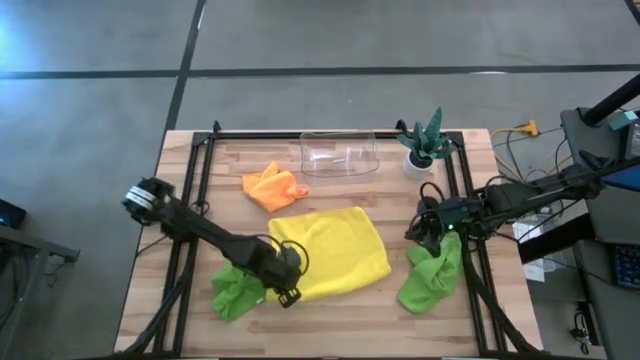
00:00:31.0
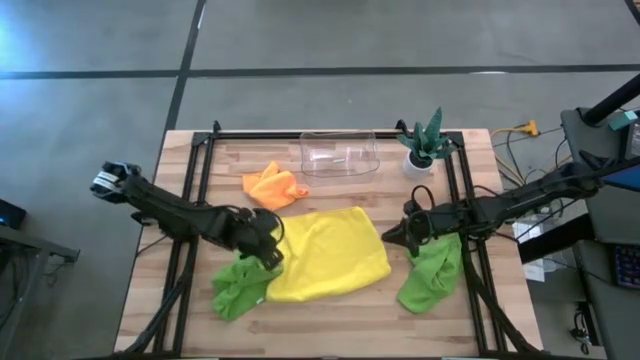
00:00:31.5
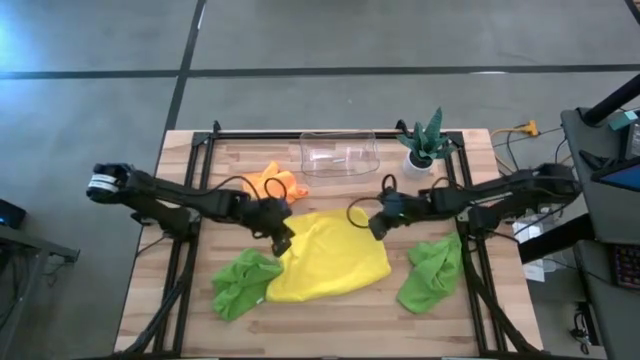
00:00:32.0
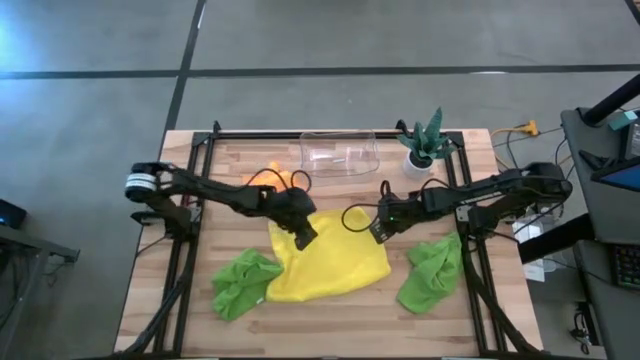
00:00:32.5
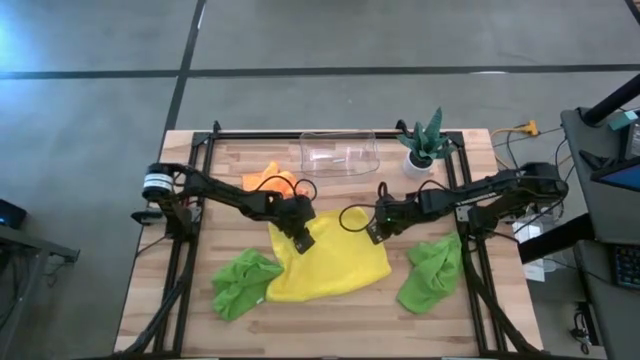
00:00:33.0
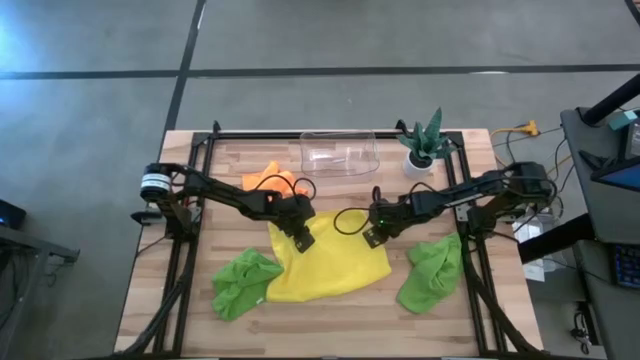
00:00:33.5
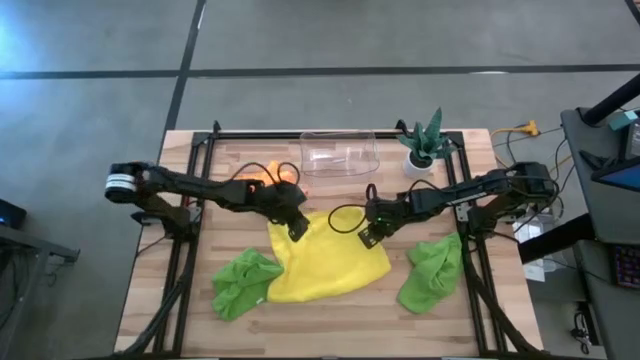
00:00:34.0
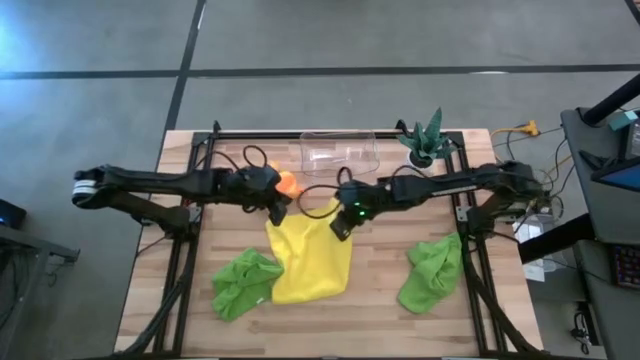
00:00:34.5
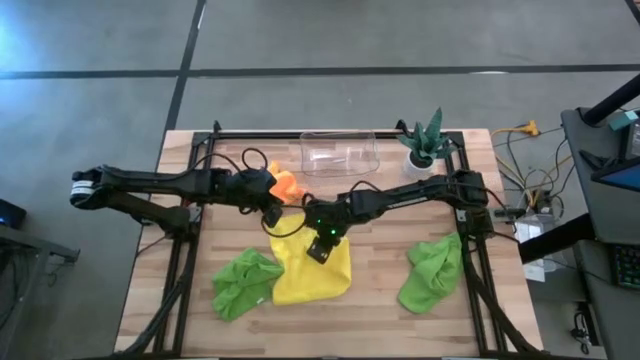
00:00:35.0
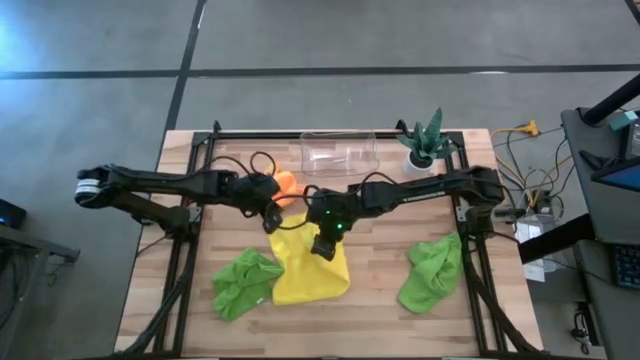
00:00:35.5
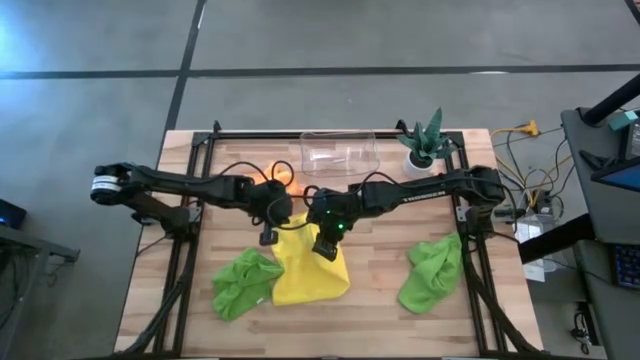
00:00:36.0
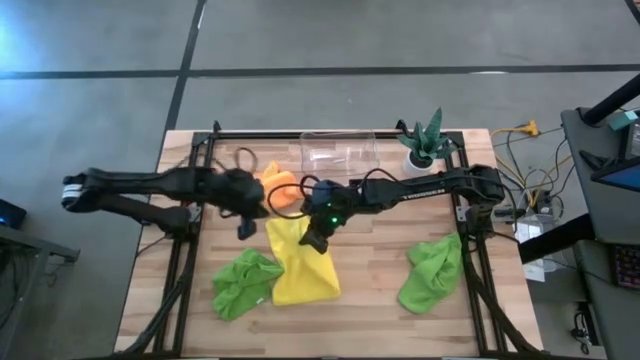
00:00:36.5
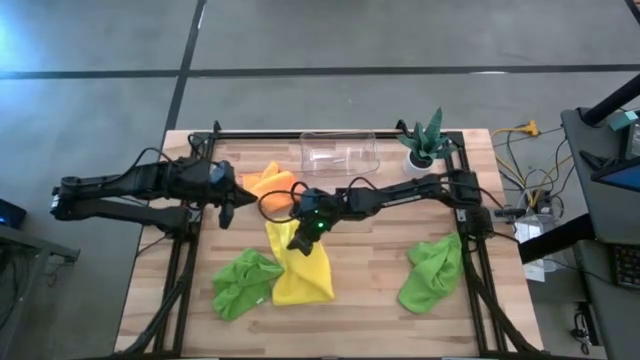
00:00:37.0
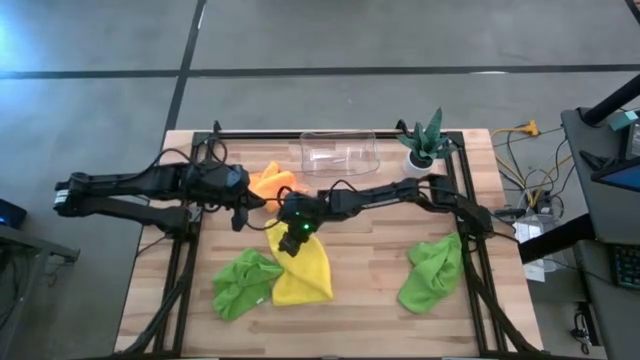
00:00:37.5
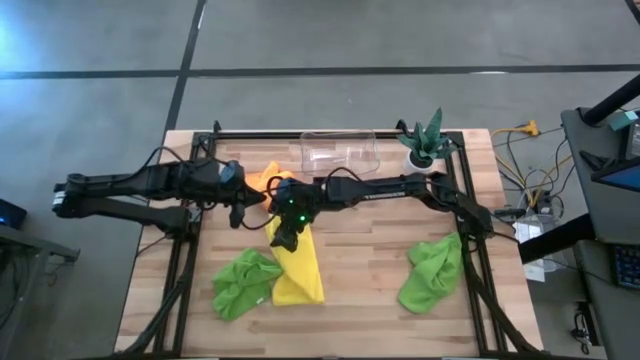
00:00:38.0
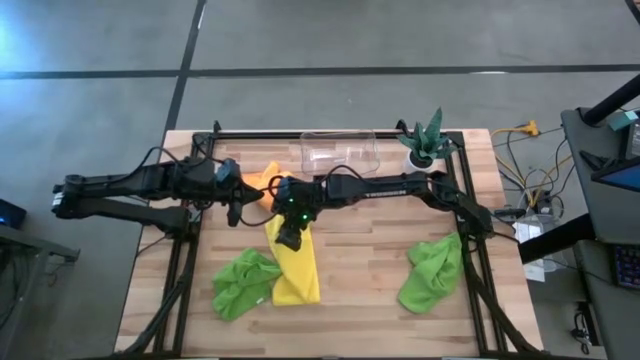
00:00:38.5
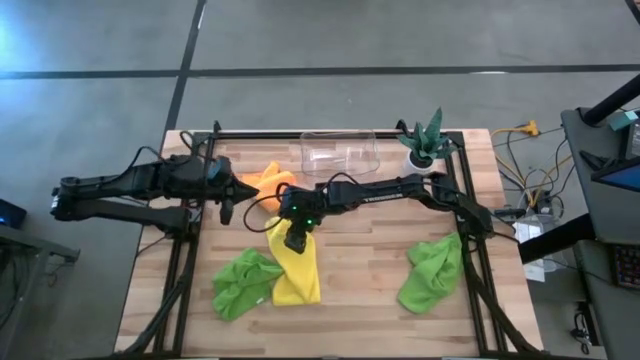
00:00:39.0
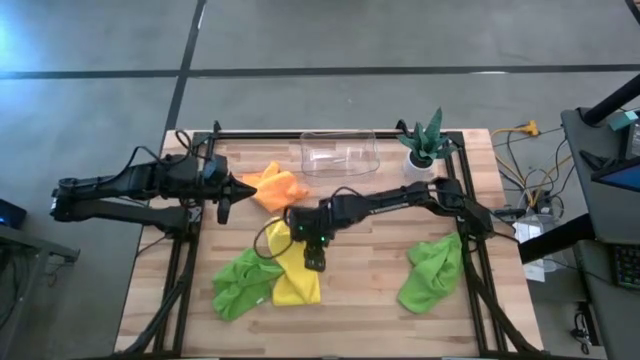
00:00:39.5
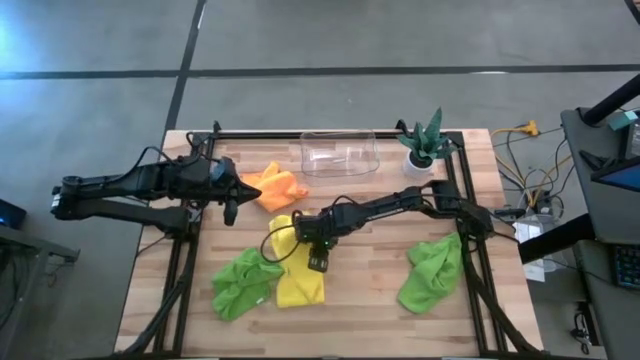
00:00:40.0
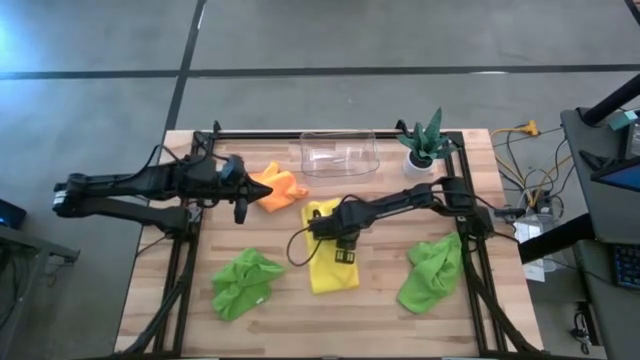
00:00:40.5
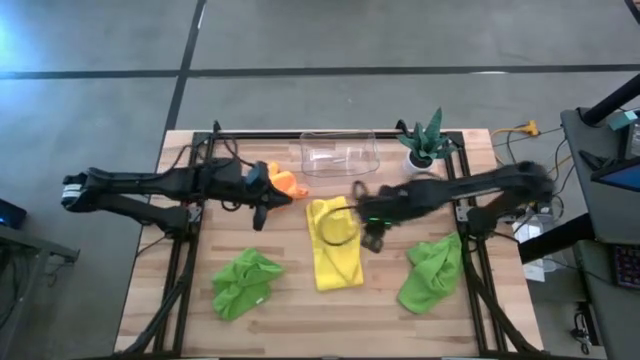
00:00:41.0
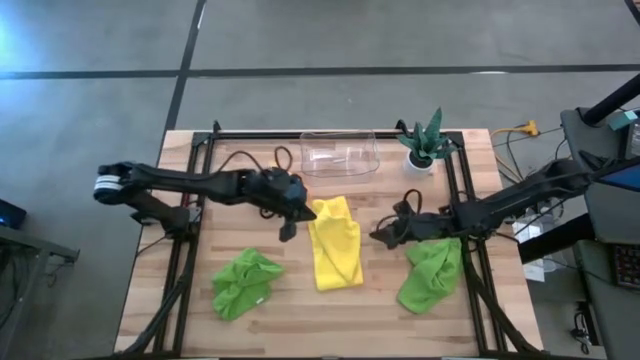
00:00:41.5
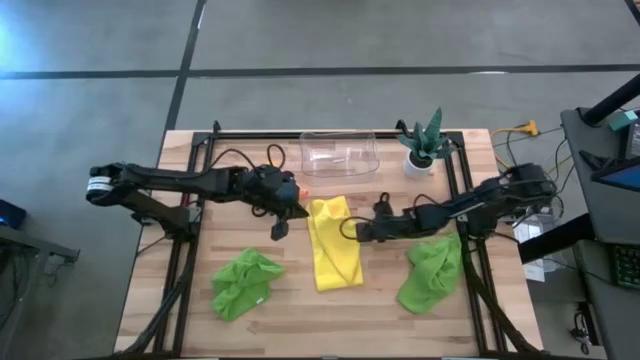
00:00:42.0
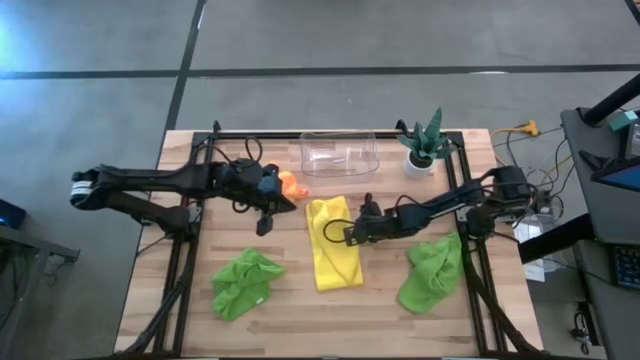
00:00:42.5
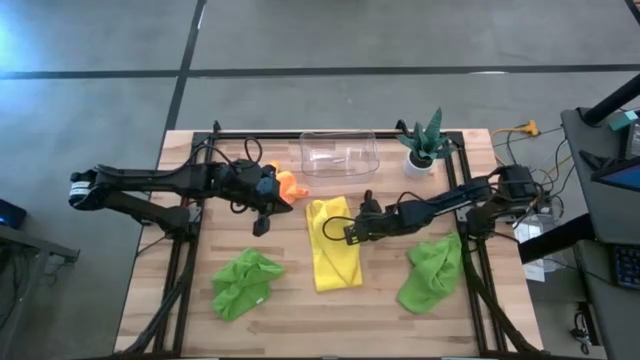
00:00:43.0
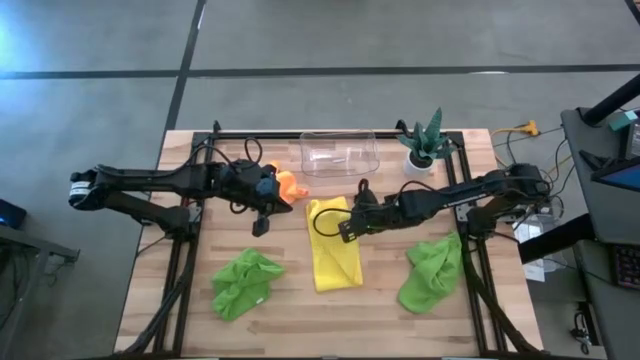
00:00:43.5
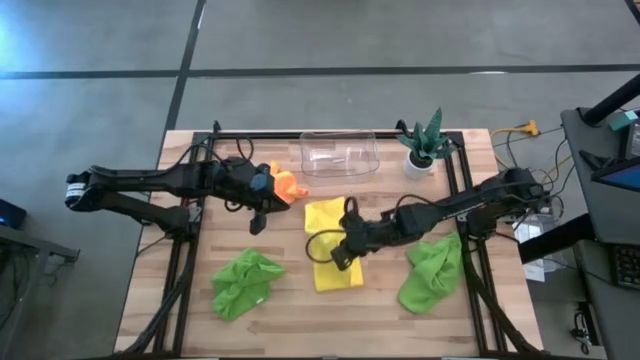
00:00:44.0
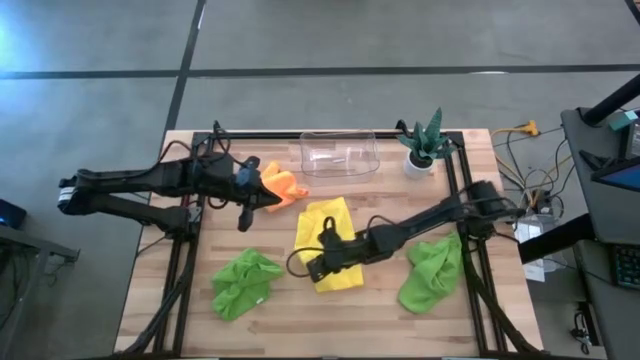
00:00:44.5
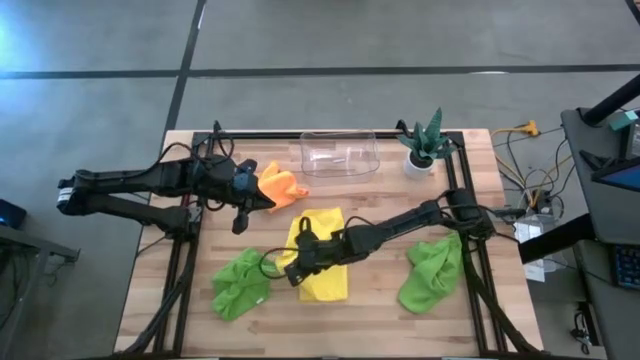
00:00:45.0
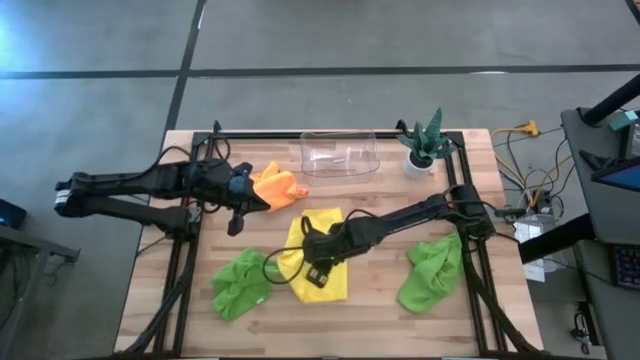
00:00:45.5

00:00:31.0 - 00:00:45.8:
Task: Fold microfiber towels
Fold the yellow microfiber towel

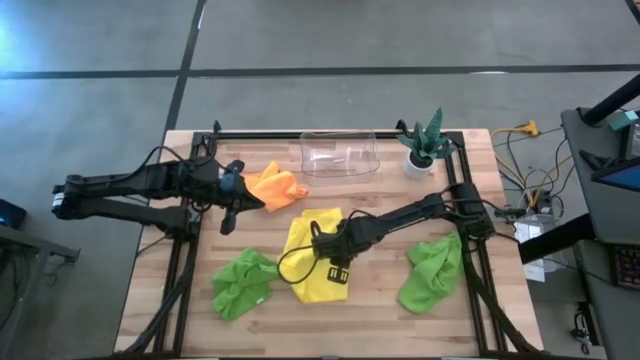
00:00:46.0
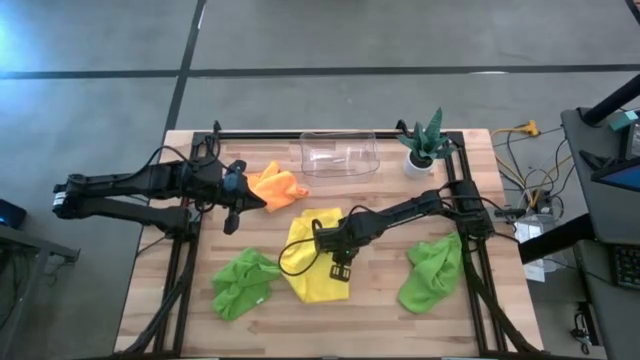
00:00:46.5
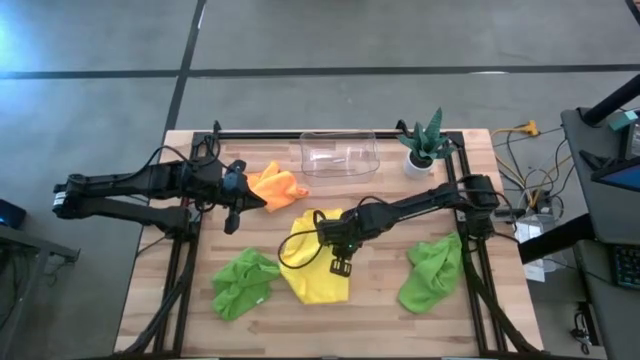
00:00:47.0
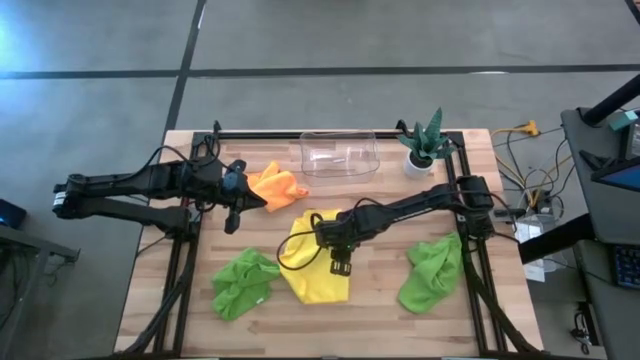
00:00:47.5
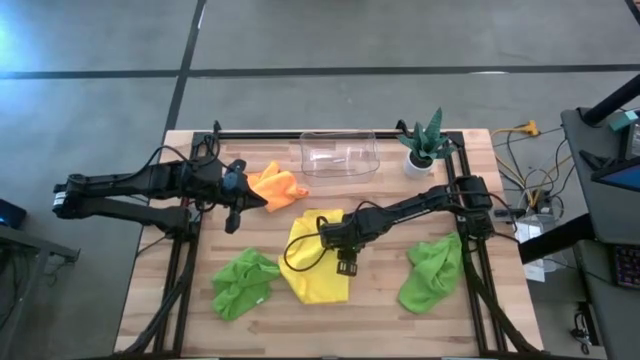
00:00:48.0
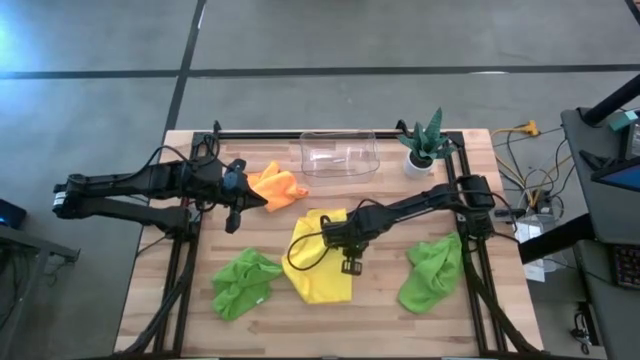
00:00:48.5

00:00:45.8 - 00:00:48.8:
Fold the yellow microfiber towel

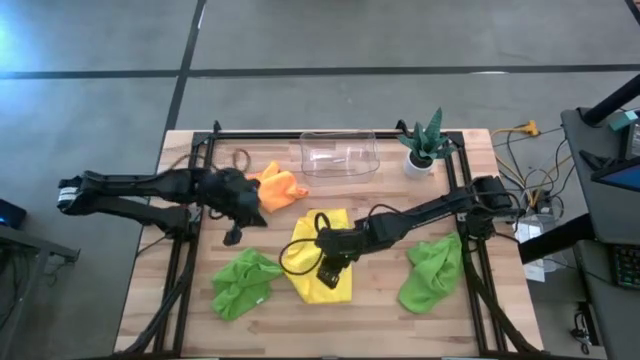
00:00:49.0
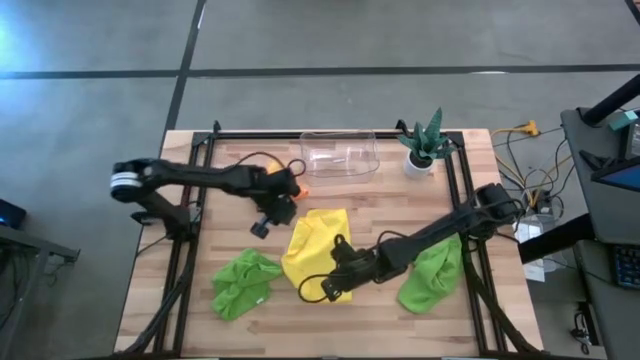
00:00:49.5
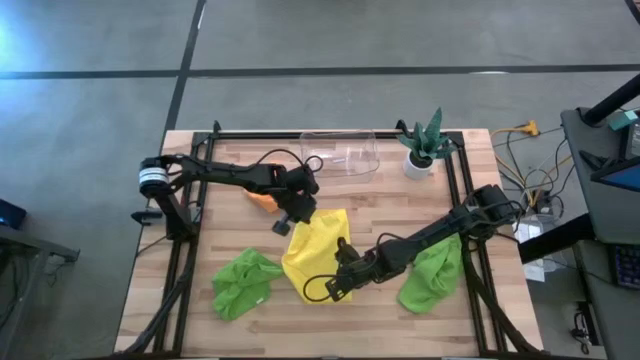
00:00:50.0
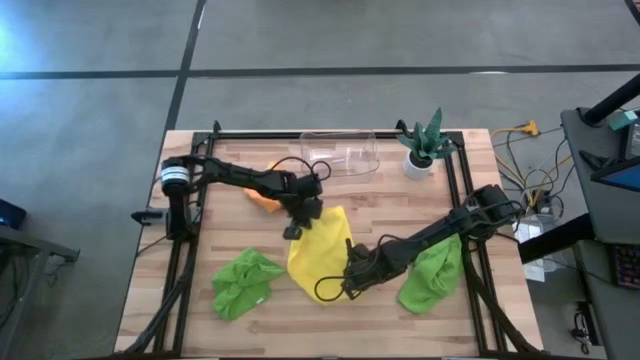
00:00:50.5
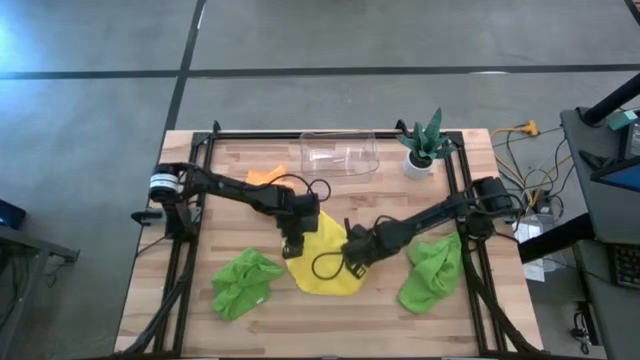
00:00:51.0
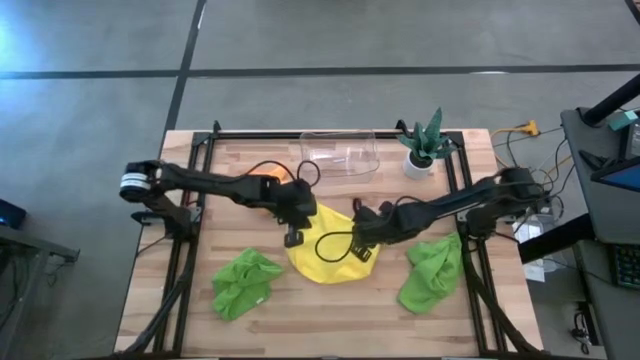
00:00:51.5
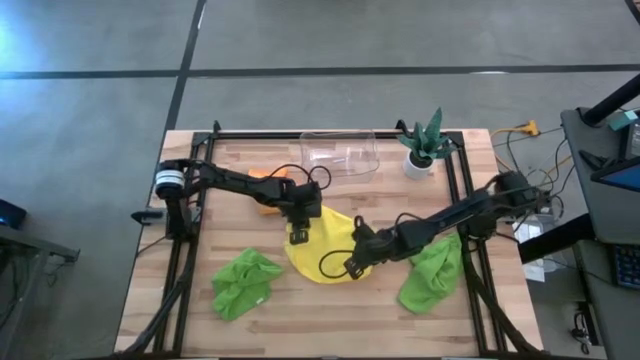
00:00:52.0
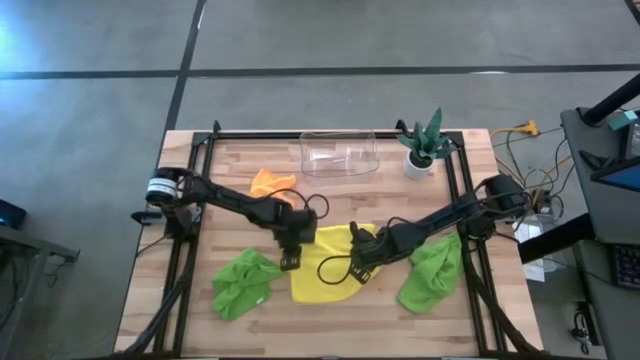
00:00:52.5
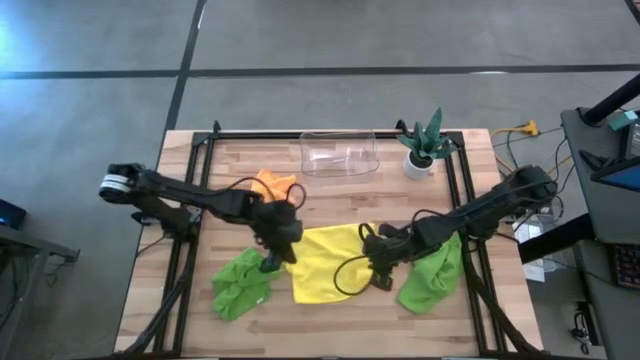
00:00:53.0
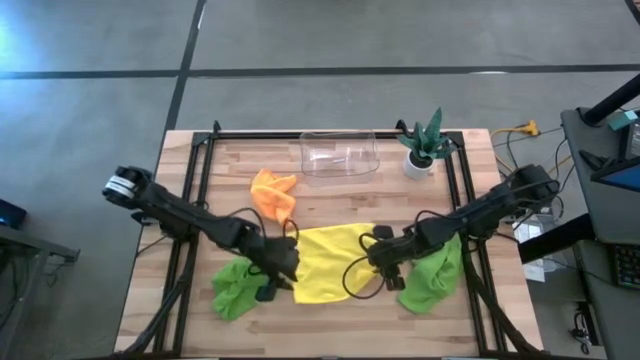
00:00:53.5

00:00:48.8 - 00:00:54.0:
Fold the yellow microfiber towel
